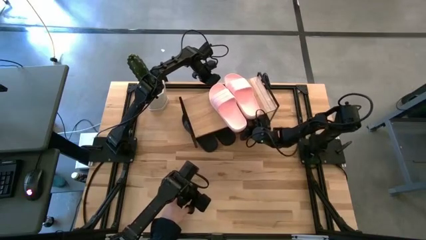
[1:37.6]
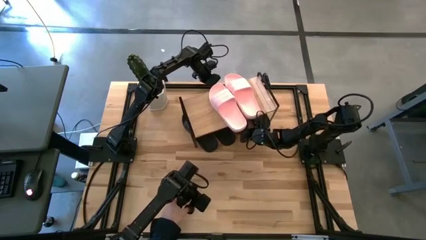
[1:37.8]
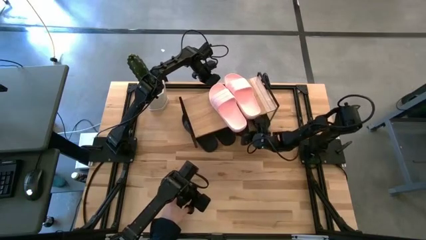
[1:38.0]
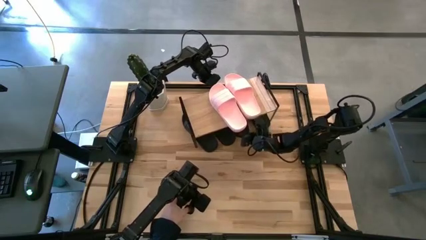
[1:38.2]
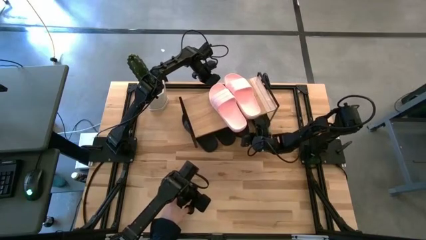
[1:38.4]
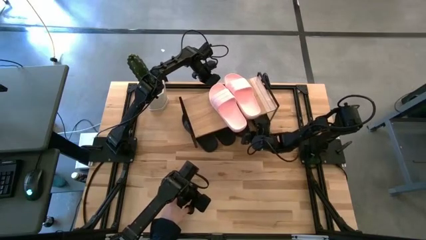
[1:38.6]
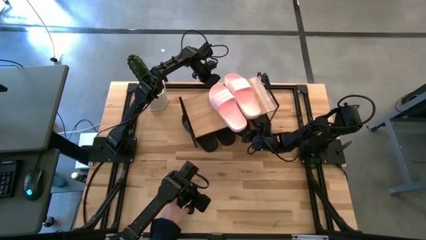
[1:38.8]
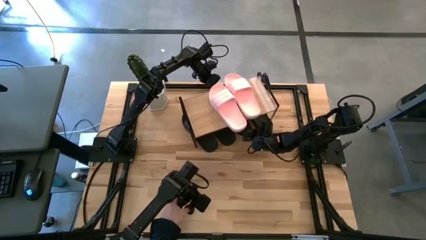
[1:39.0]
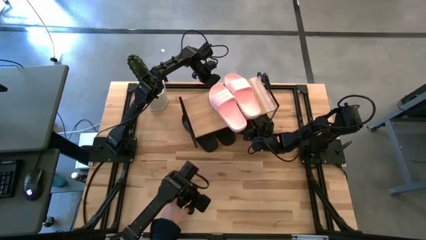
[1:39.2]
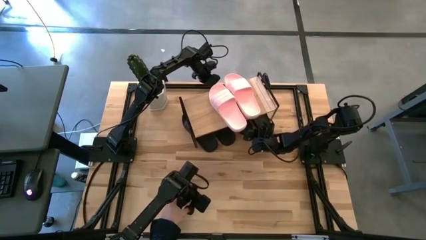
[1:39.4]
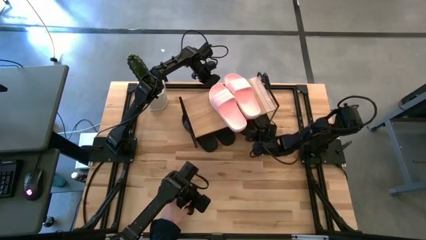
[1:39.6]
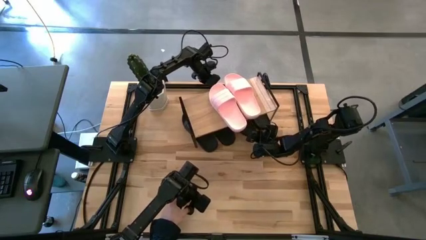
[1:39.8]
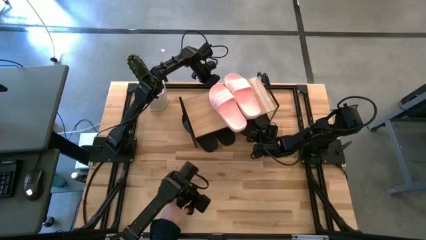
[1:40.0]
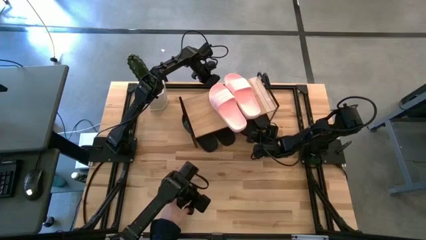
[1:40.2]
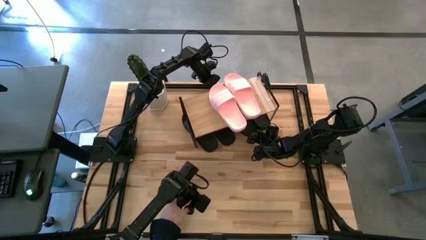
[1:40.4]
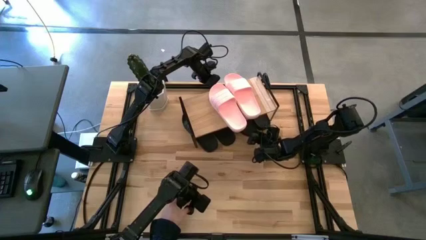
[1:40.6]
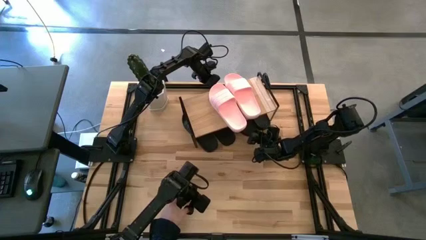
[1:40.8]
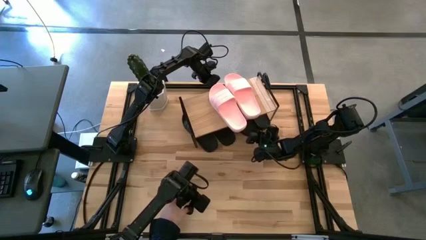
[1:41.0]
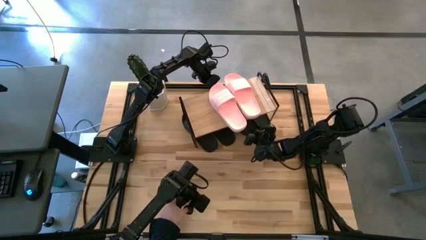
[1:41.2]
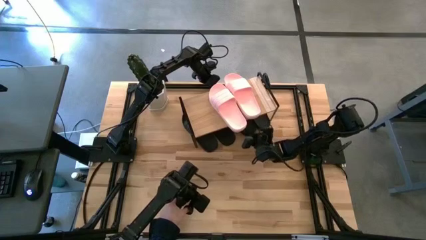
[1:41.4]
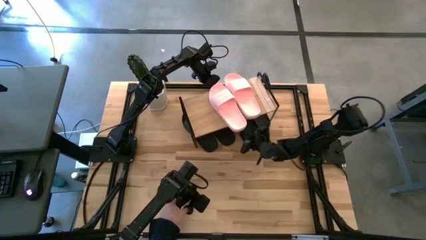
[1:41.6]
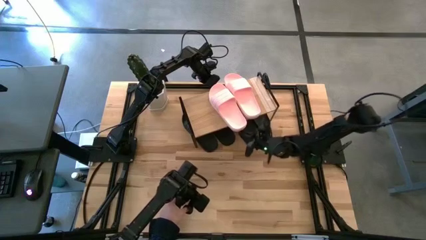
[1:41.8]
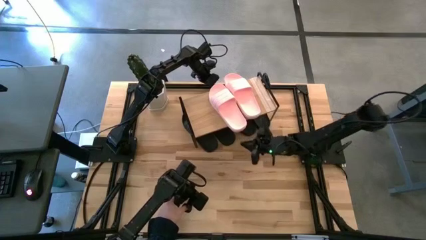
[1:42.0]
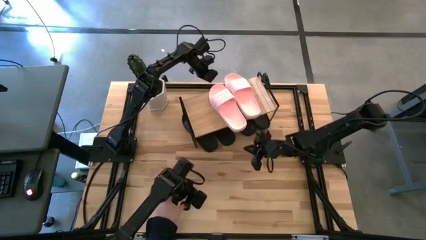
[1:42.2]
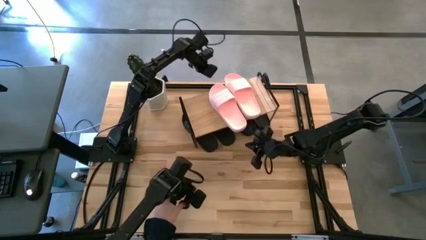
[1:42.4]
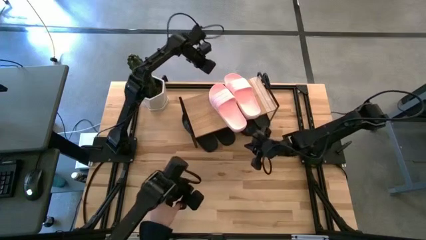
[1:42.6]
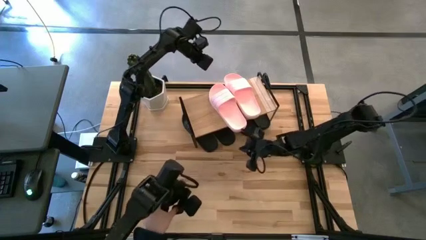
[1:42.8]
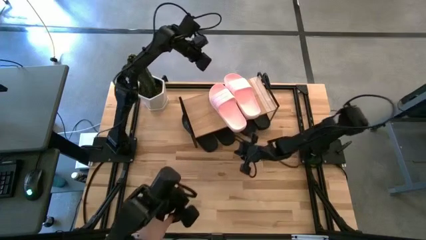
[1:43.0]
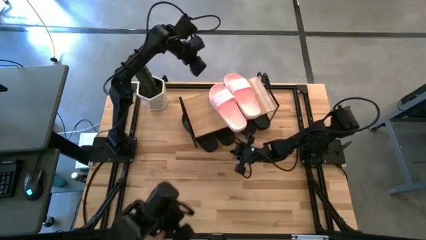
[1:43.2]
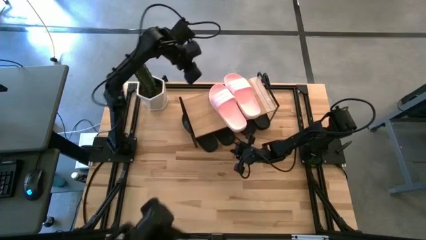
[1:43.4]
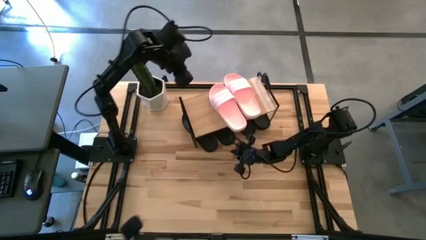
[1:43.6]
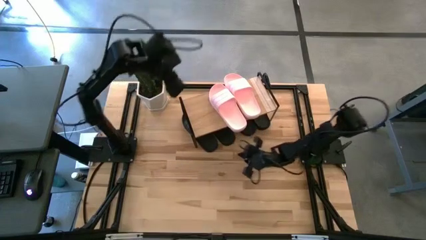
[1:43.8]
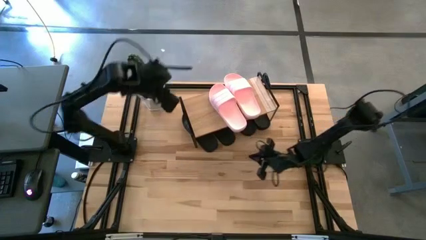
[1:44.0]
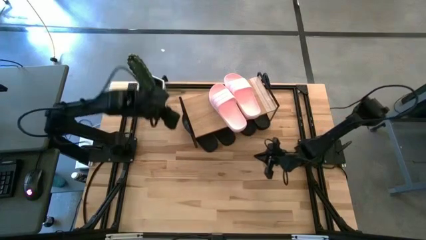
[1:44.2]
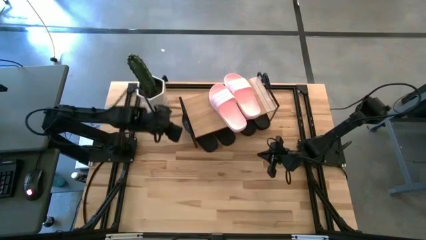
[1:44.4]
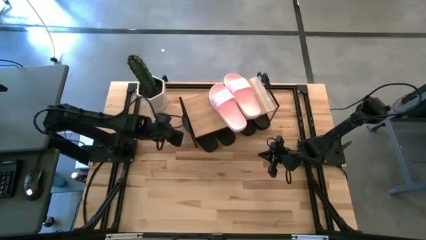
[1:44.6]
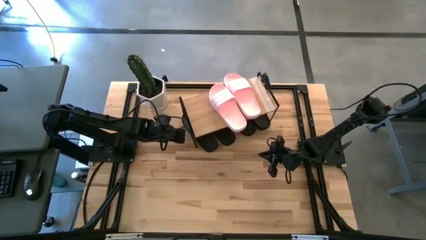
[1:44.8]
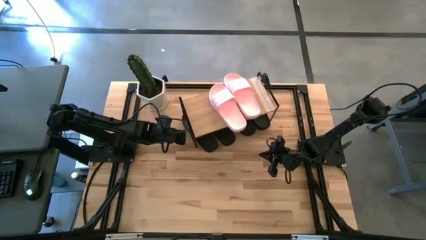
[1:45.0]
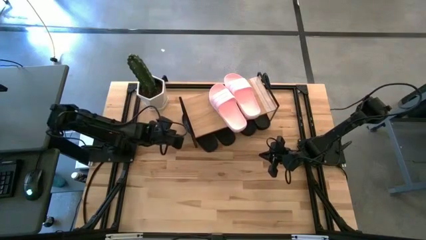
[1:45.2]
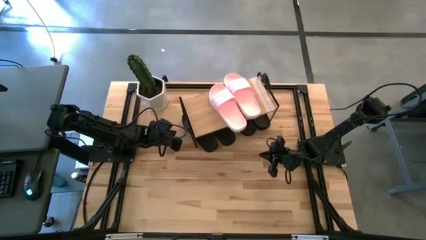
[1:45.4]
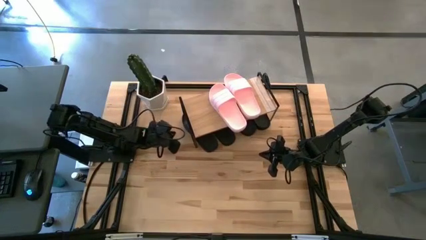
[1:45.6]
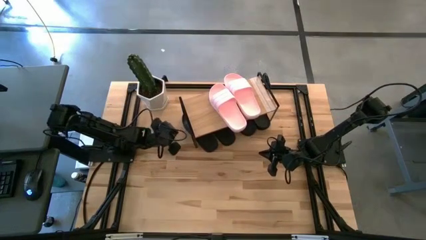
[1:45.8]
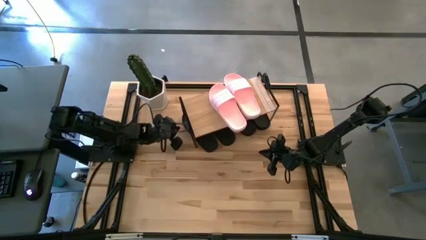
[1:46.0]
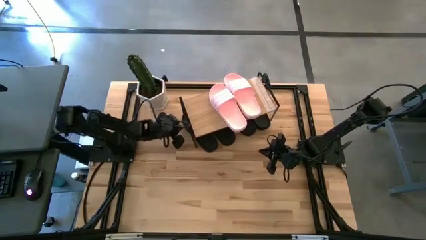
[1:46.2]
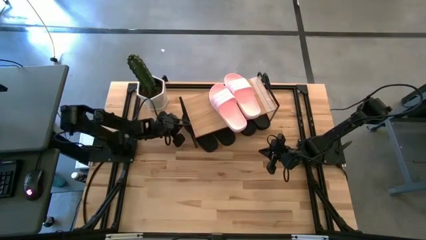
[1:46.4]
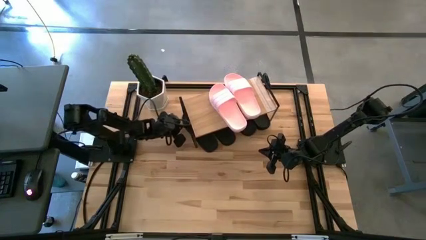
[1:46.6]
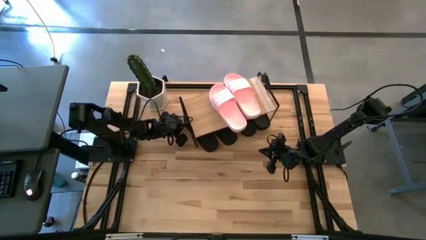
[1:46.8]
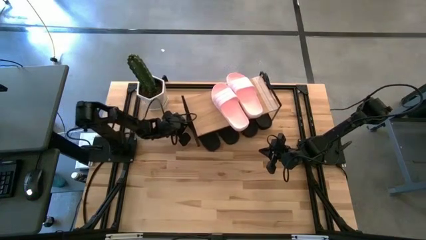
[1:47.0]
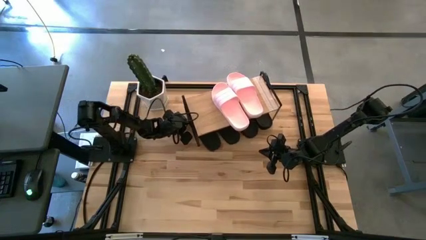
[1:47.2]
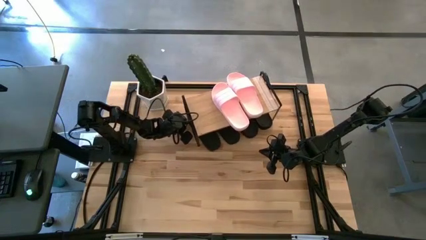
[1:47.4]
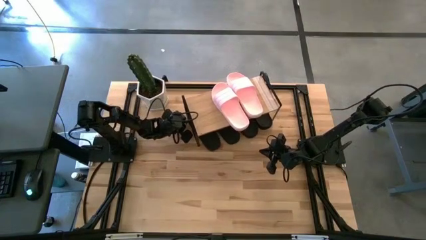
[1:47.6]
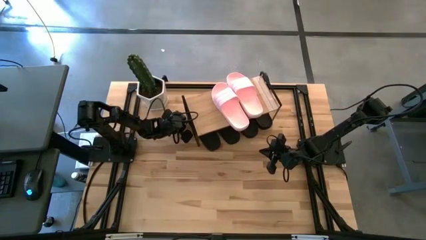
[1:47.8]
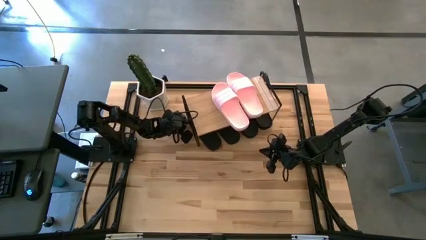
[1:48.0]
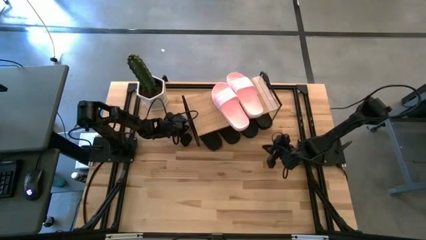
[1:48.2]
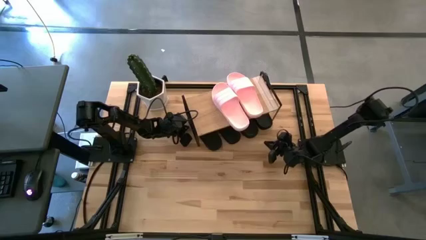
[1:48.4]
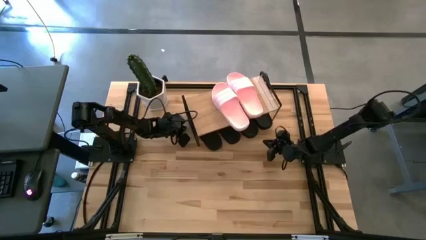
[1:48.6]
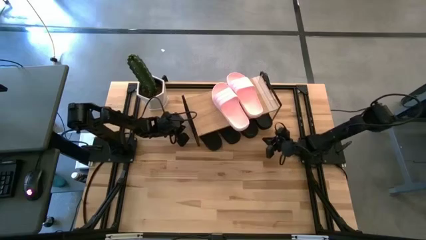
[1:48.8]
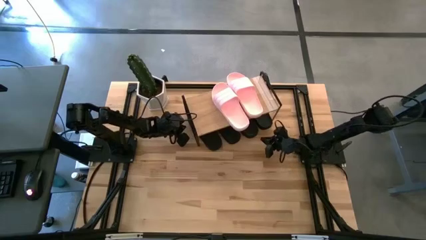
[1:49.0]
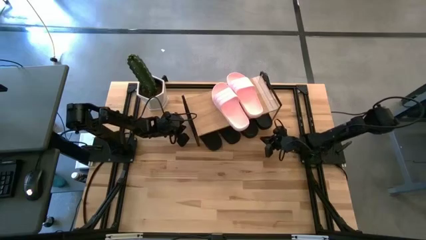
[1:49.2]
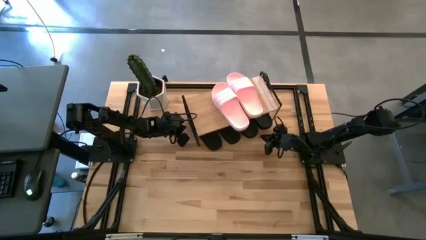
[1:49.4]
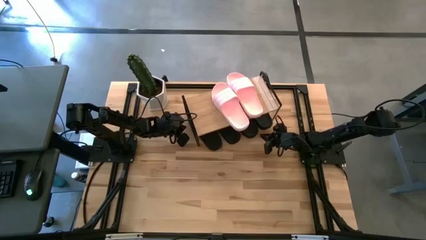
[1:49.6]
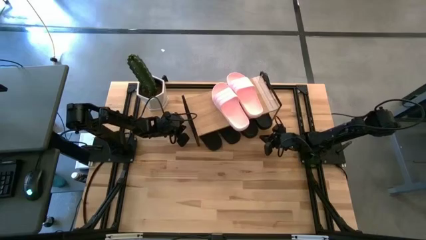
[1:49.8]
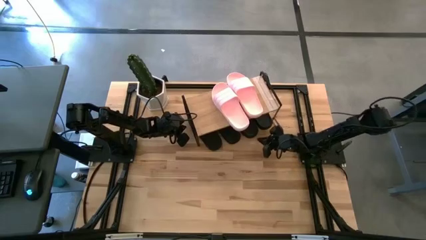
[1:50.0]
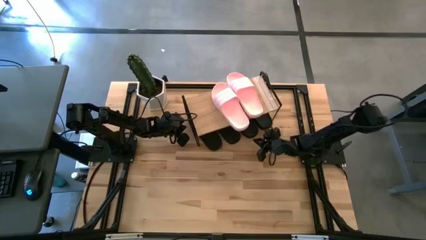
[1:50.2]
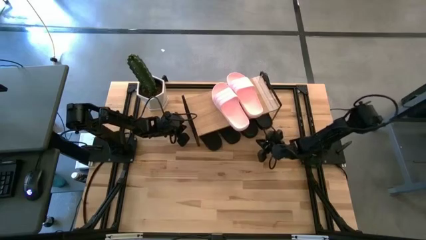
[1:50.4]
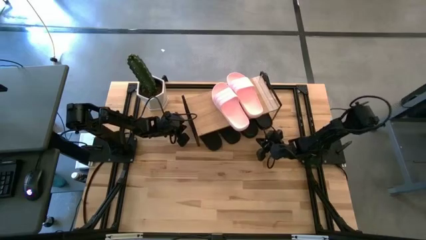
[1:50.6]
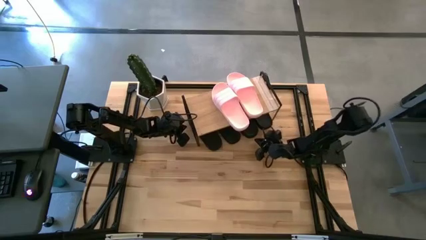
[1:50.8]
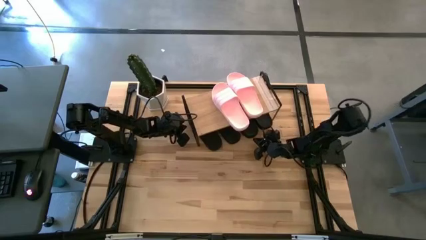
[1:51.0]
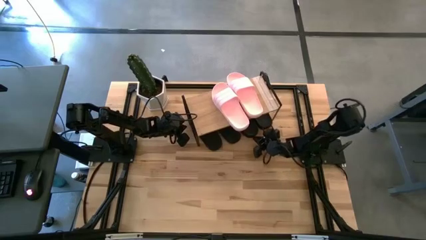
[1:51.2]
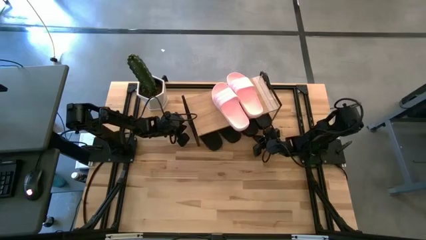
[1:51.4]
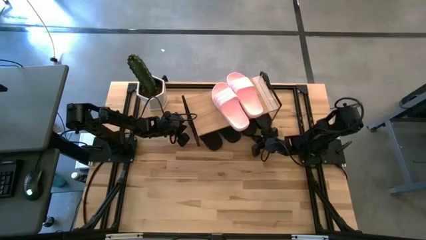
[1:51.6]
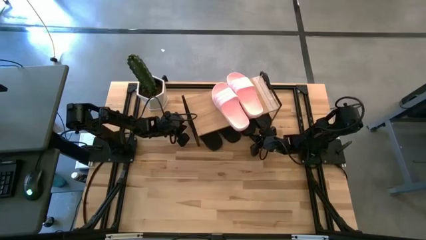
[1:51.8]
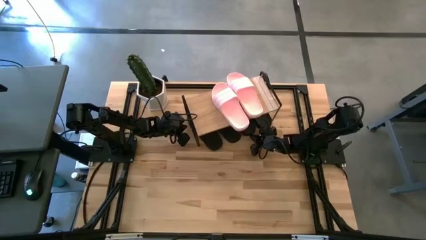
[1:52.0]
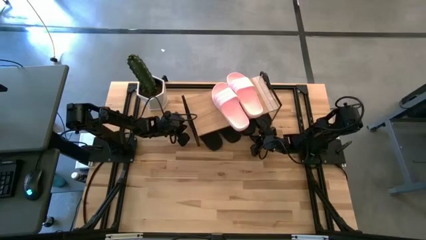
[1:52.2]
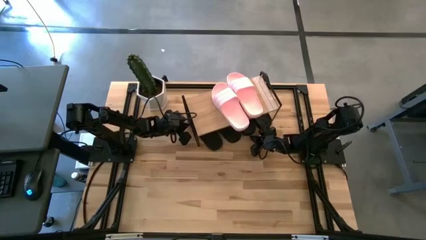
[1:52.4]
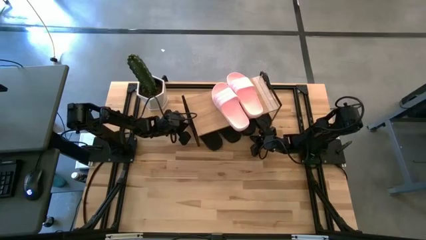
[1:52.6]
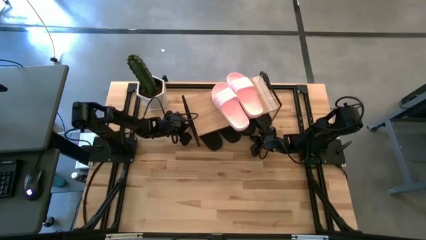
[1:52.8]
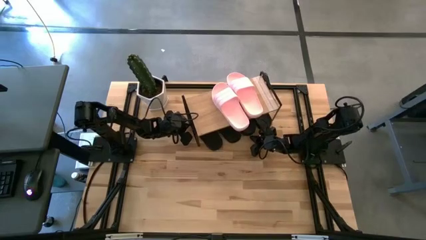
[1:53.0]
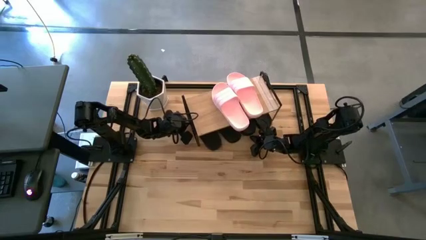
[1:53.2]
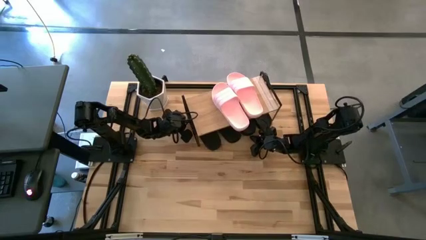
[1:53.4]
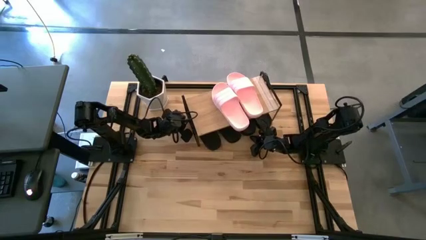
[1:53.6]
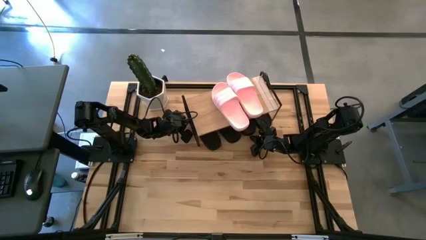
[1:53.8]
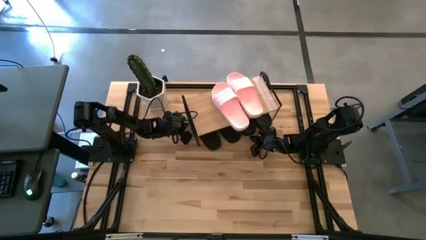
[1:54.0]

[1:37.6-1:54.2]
Task: Pick and place slides into the shelf
Adjust the black slides under the shelf
